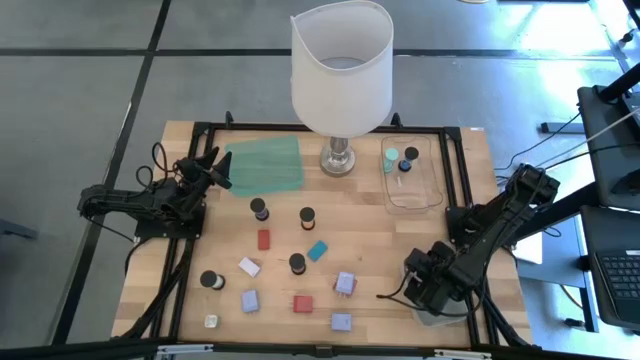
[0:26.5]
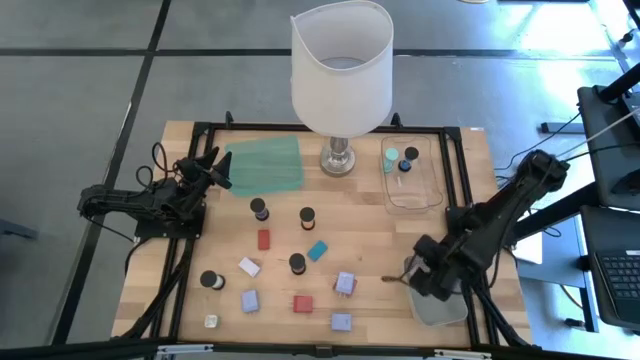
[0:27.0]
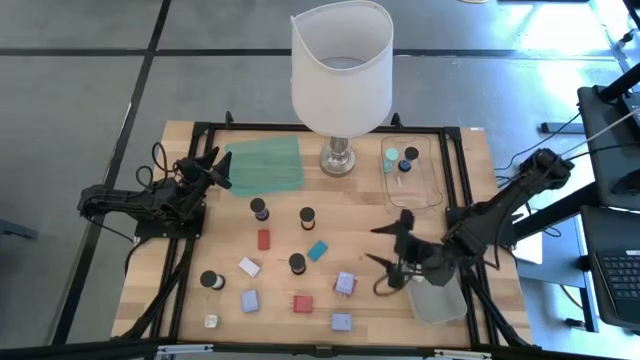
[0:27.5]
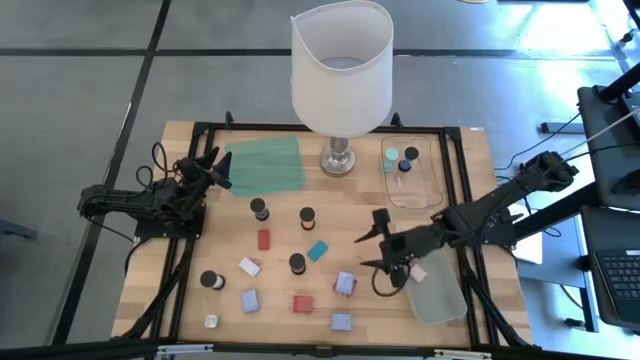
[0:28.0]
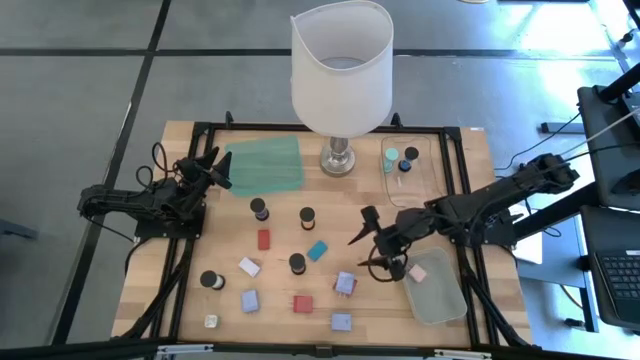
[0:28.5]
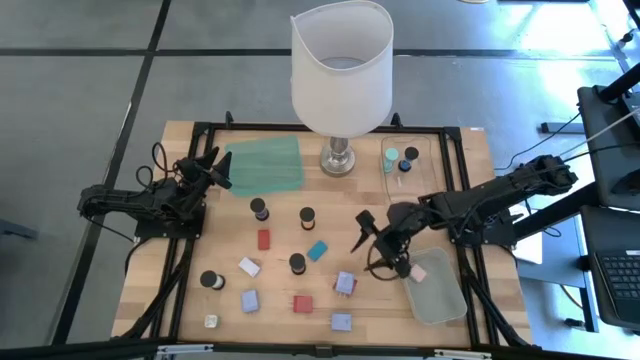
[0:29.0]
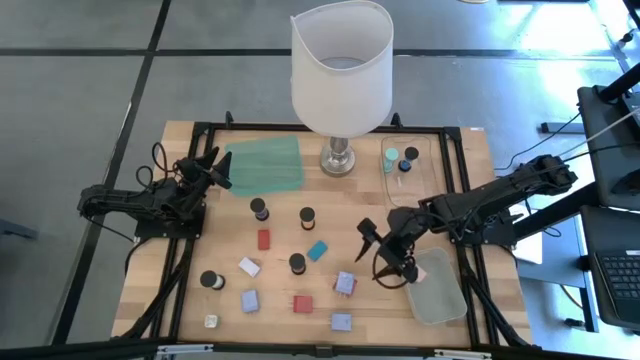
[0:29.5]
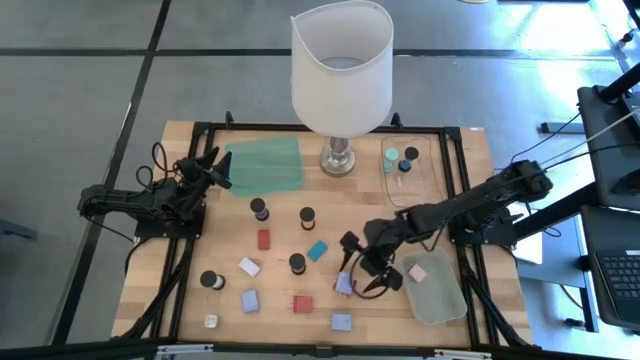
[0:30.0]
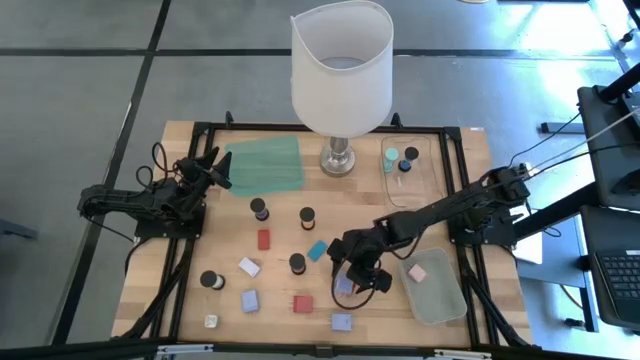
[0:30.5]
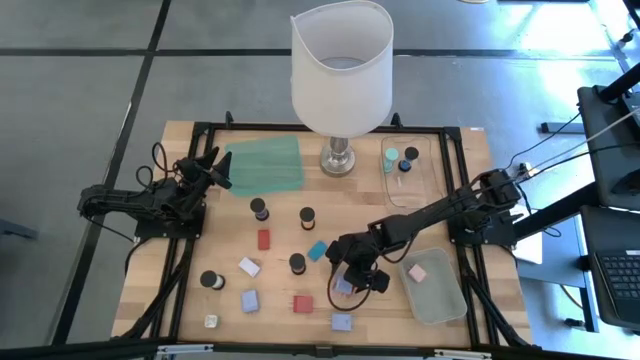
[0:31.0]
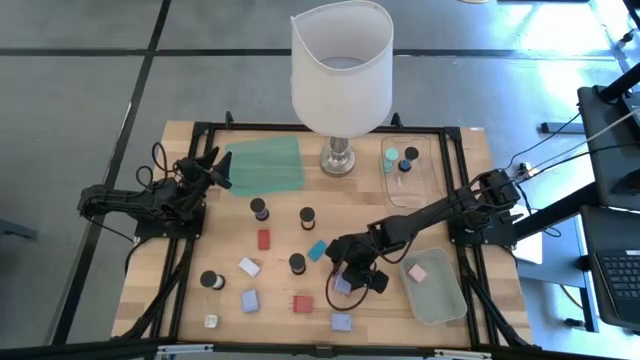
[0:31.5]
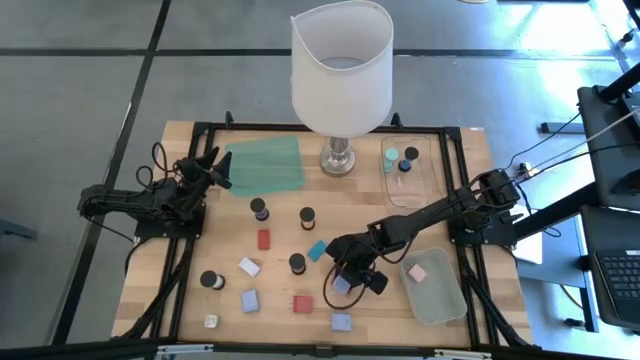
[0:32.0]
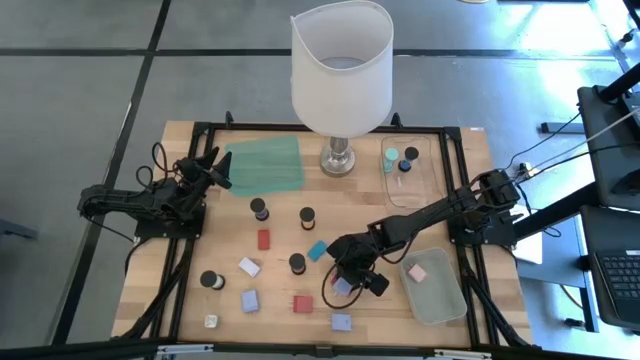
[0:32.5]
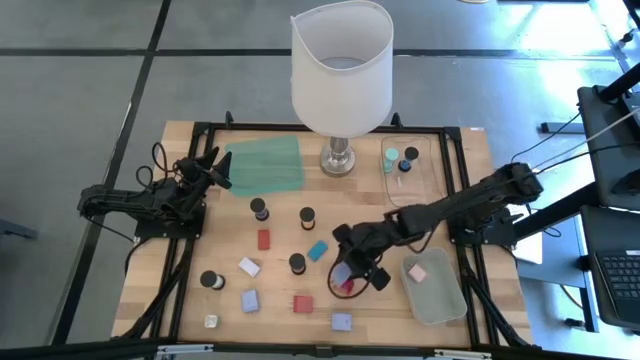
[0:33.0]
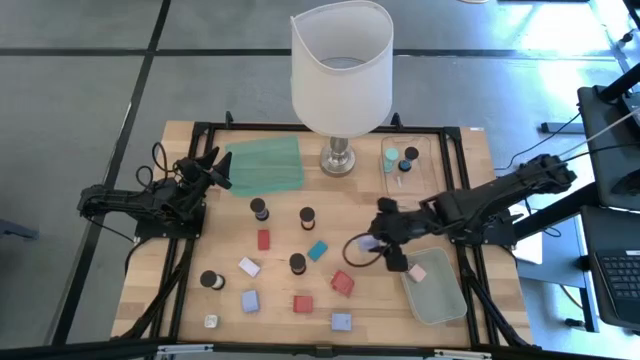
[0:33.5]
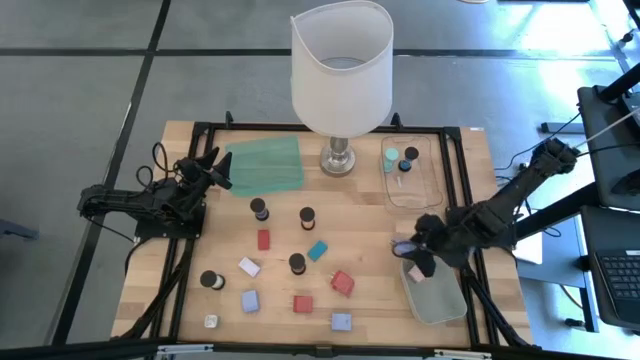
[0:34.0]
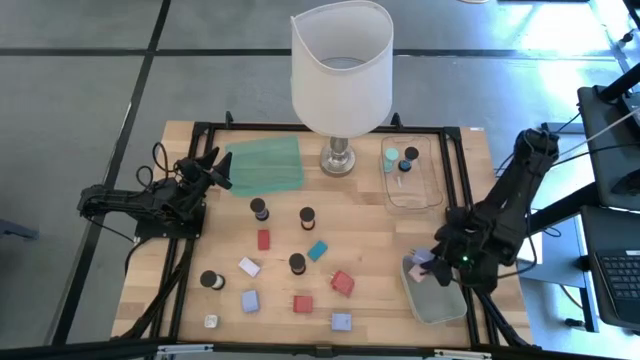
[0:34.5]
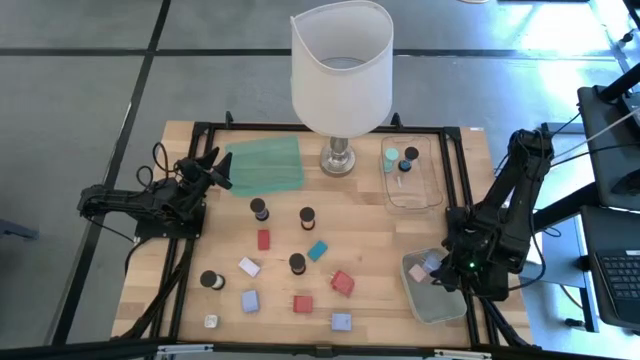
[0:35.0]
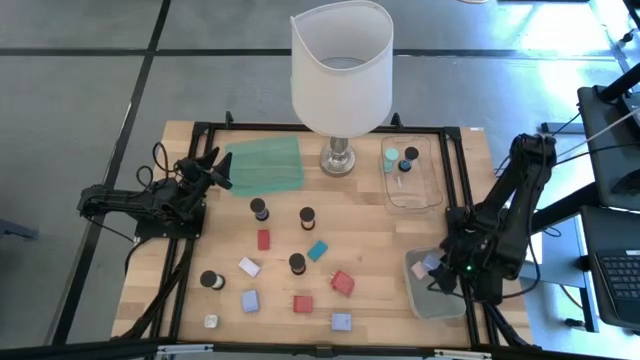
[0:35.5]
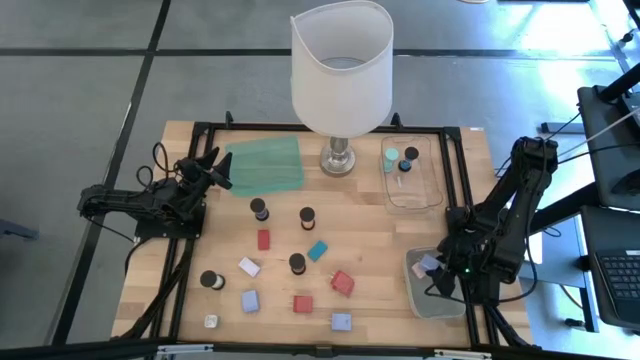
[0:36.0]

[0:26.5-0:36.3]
Task: Pick & Place Office items
Put the top violet charger adapter into the gray bin

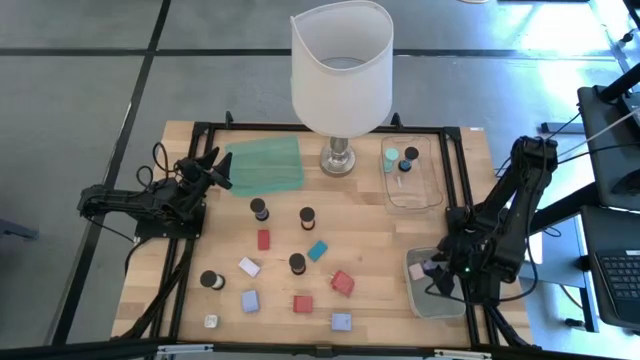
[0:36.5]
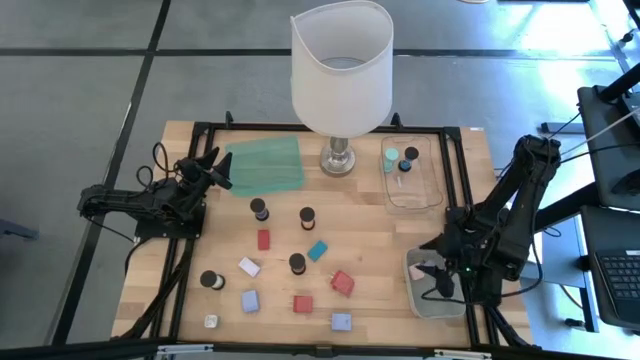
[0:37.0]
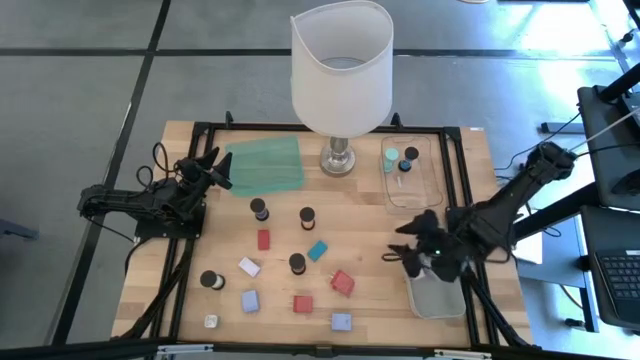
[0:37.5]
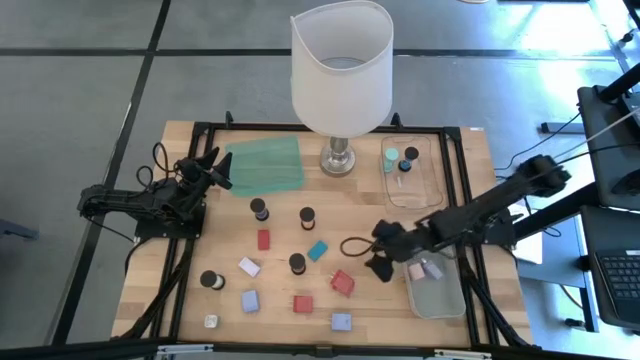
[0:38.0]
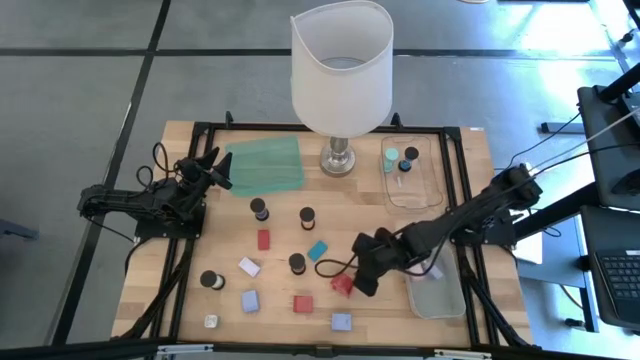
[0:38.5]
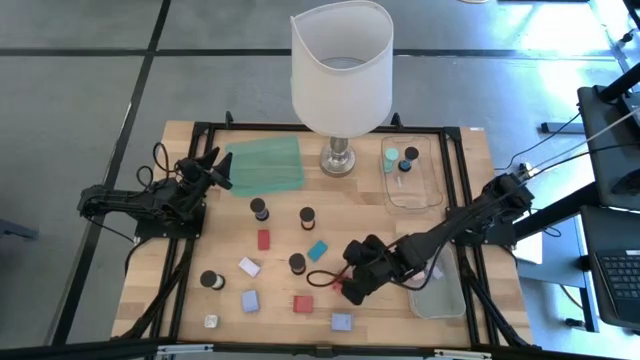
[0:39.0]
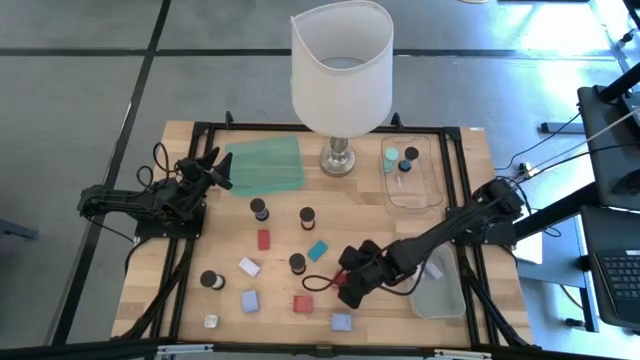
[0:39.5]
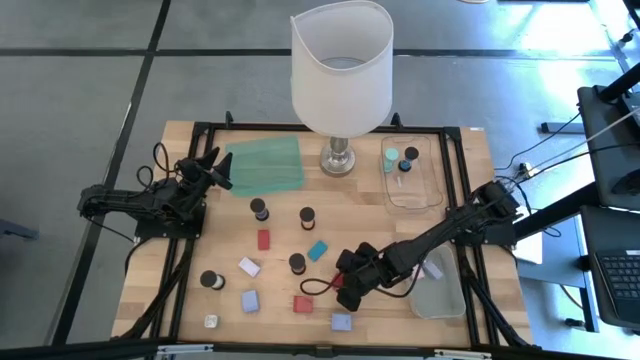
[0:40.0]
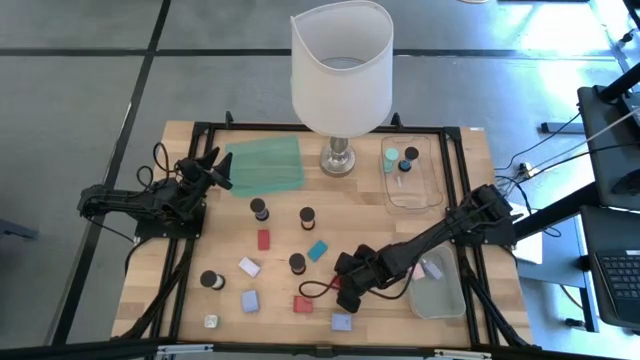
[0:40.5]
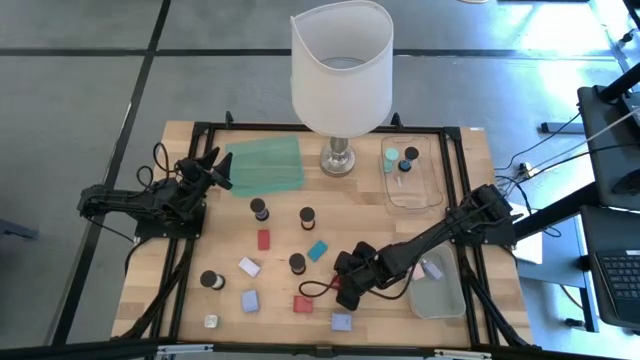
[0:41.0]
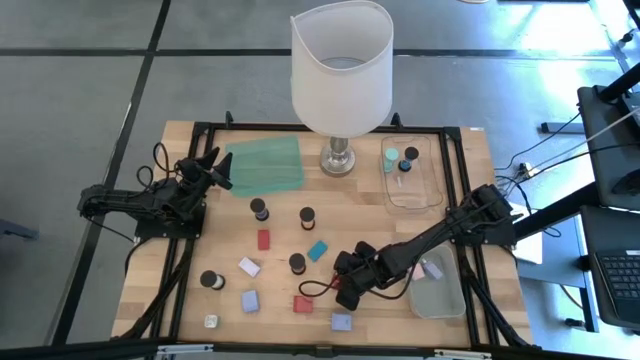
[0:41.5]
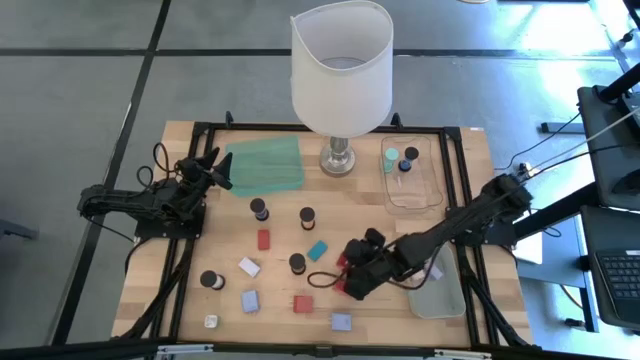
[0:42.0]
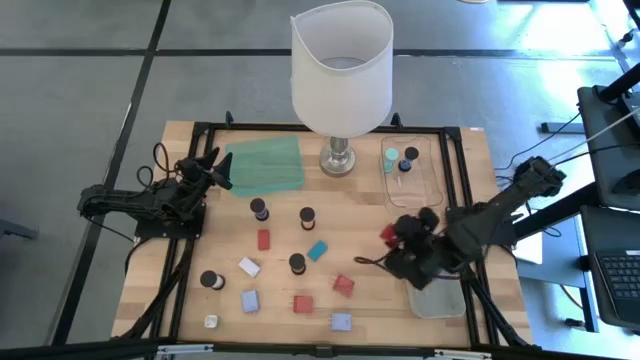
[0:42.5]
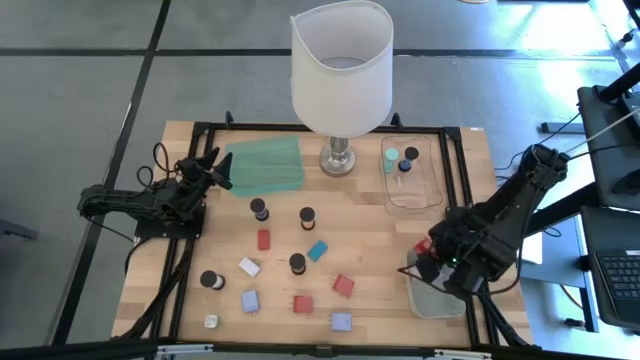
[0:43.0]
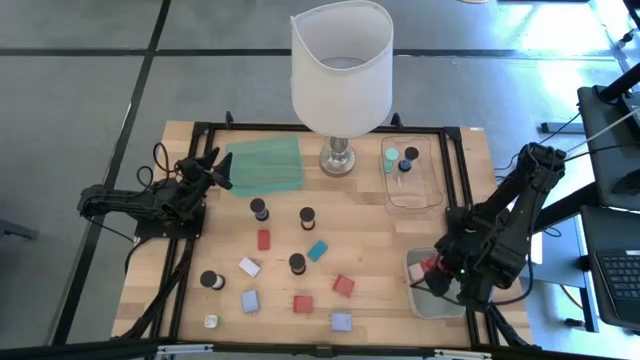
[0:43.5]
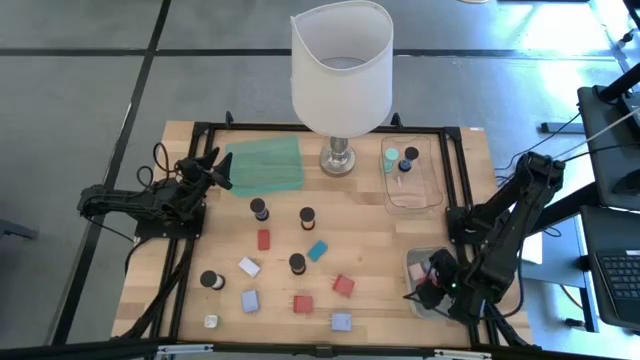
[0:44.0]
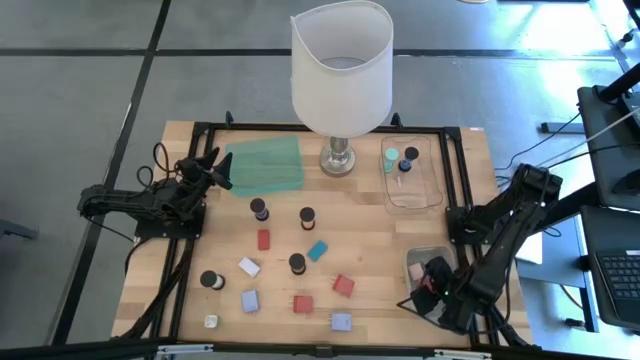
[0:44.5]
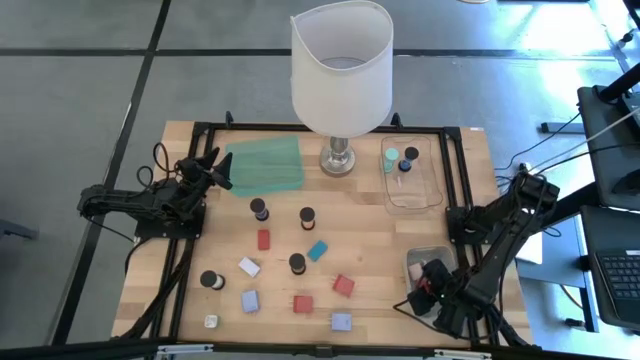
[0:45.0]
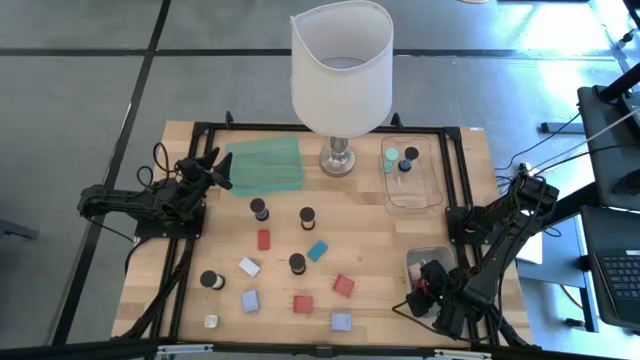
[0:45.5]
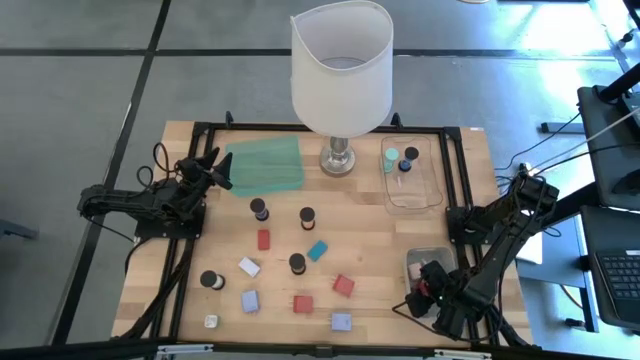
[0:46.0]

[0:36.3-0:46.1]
Put the top red charger adapter into the gray bin
